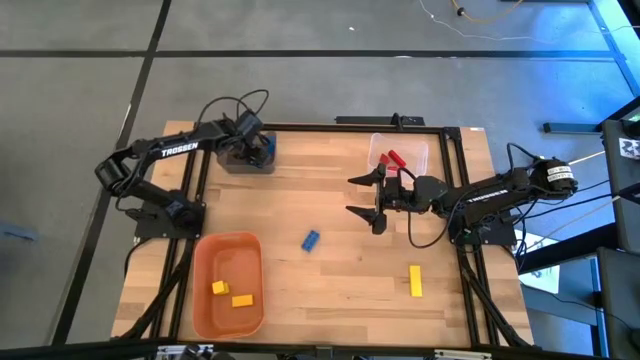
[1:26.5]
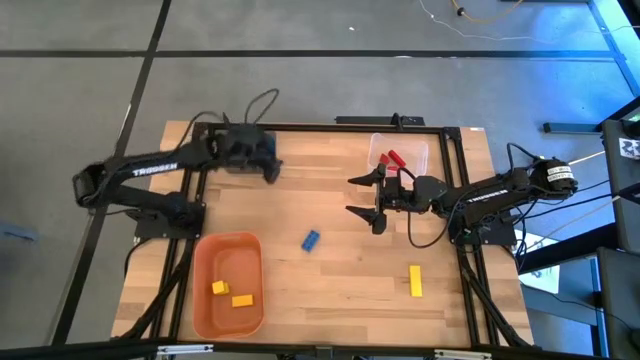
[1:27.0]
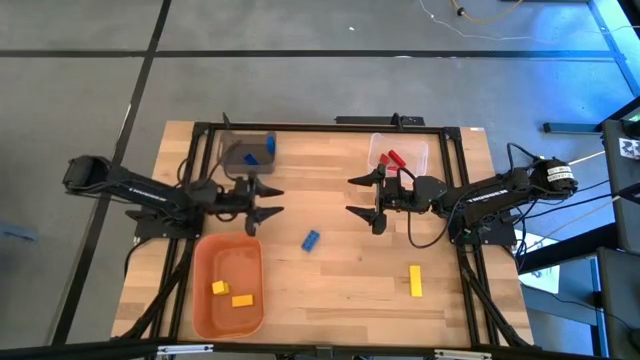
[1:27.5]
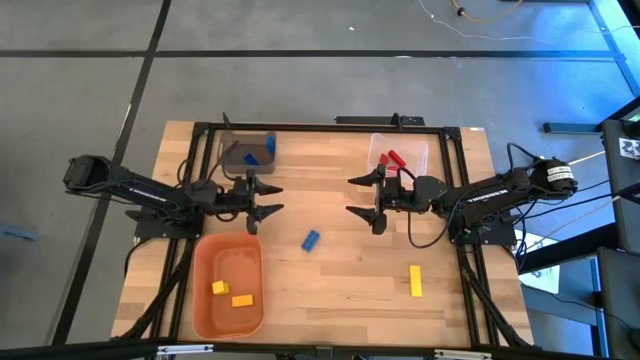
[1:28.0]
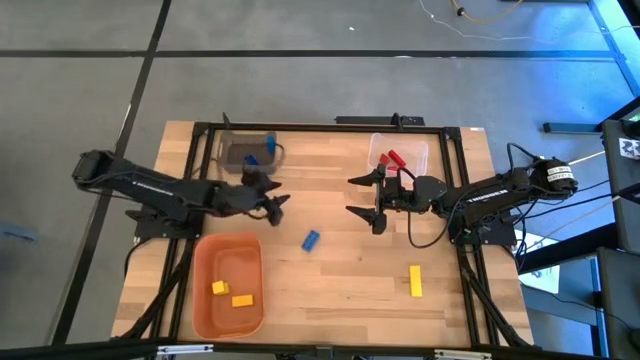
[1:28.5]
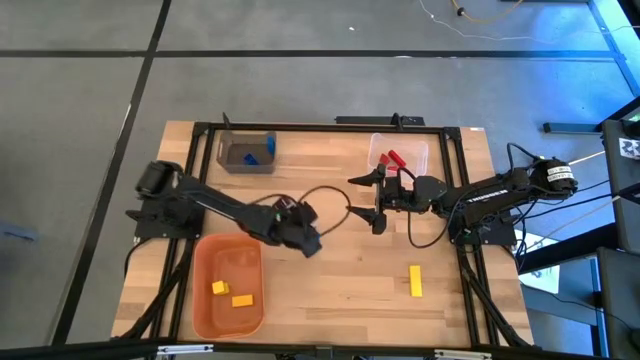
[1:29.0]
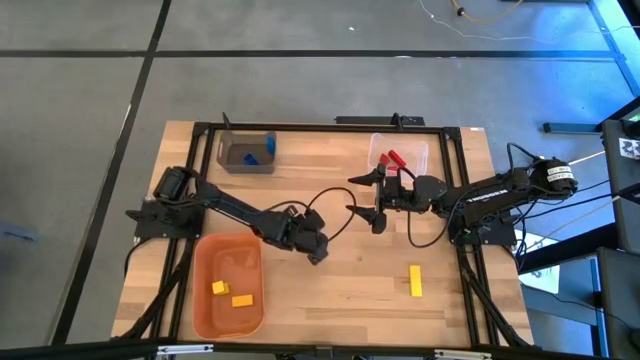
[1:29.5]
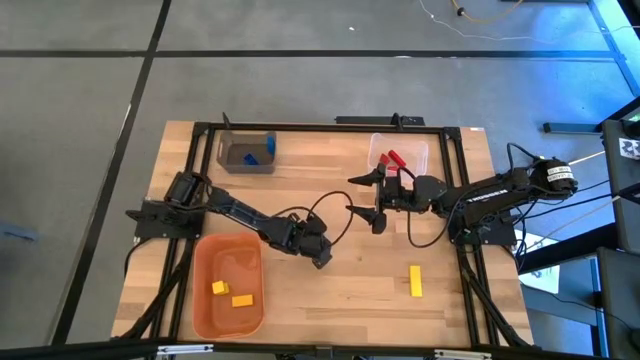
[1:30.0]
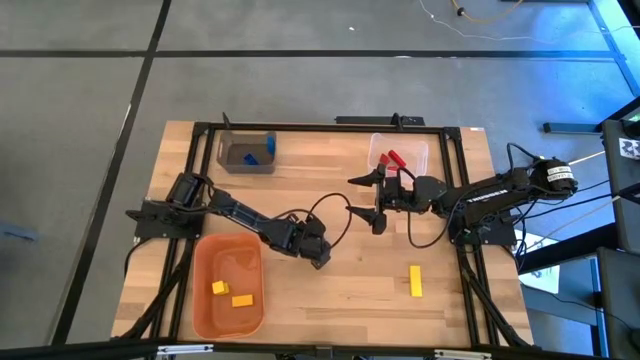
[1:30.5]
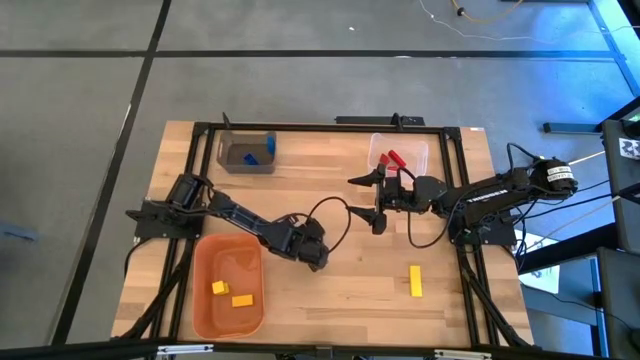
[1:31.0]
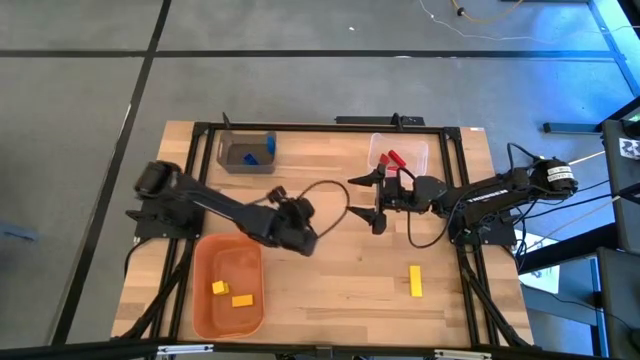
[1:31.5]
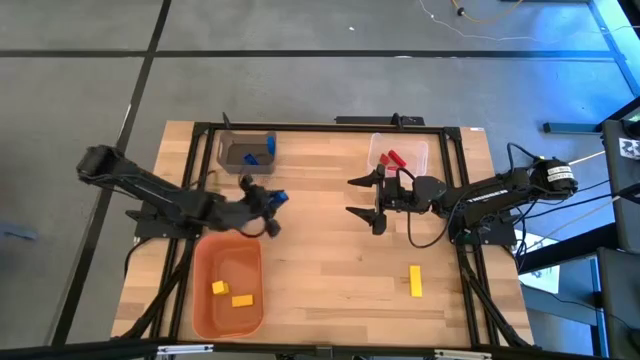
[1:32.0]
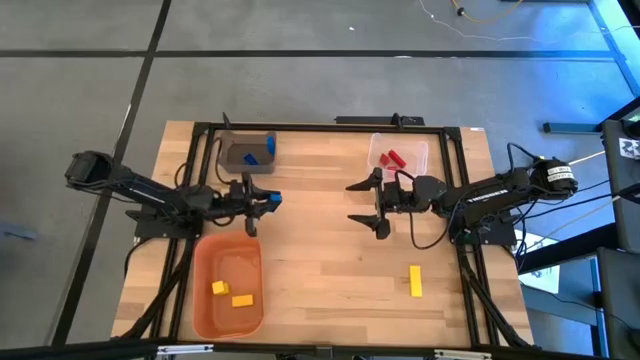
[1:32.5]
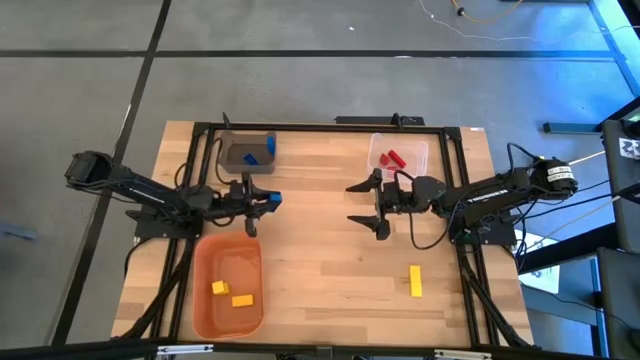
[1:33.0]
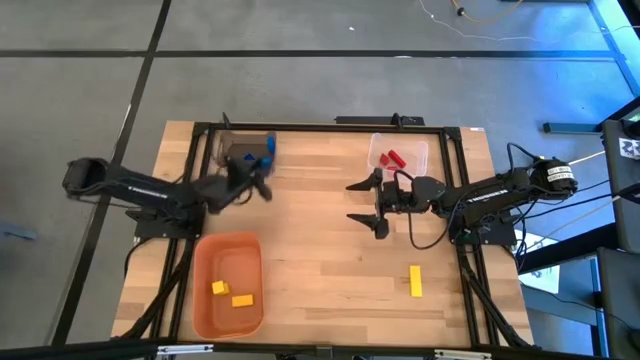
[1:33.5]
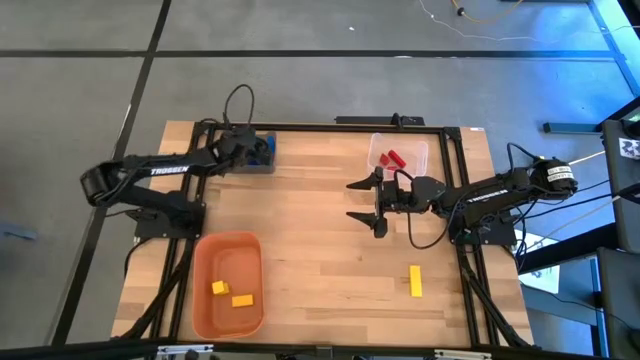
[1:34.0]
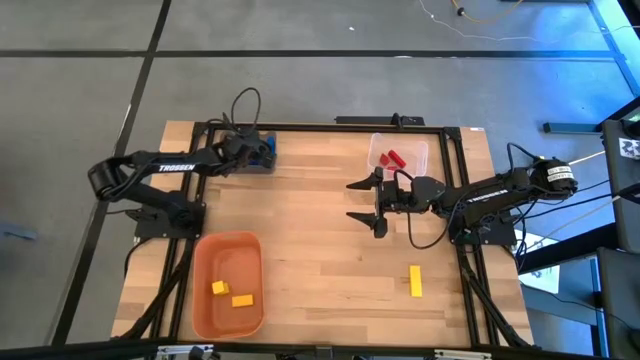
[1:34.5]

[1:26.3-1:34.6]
Task: Sort & place blocks by color
Put the blue gamepiece into the black bin

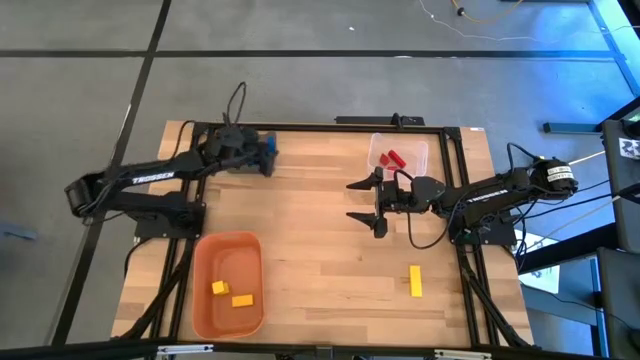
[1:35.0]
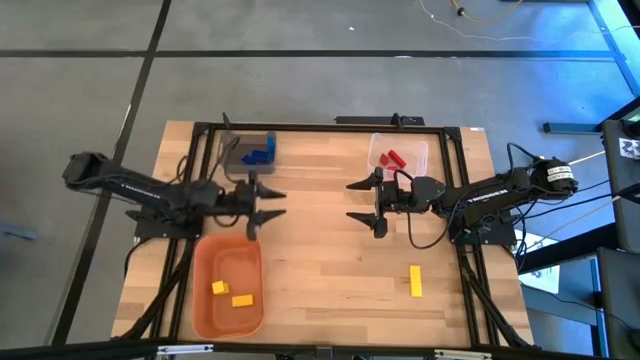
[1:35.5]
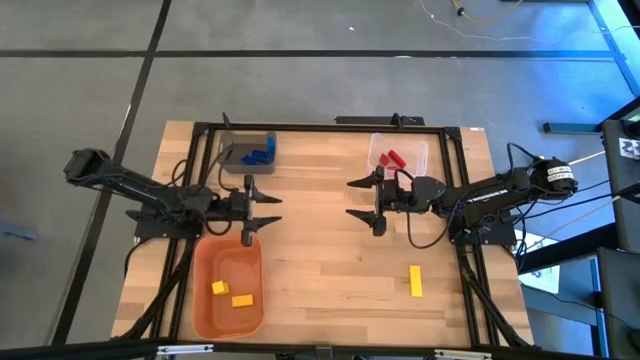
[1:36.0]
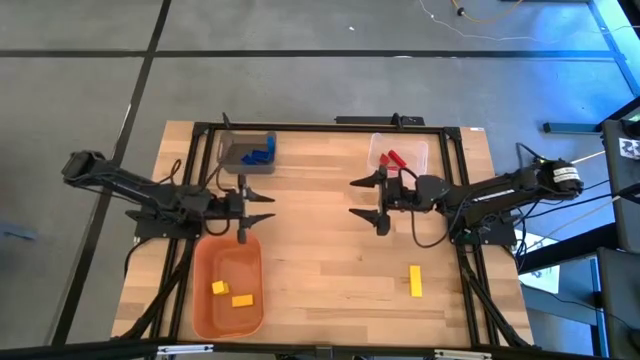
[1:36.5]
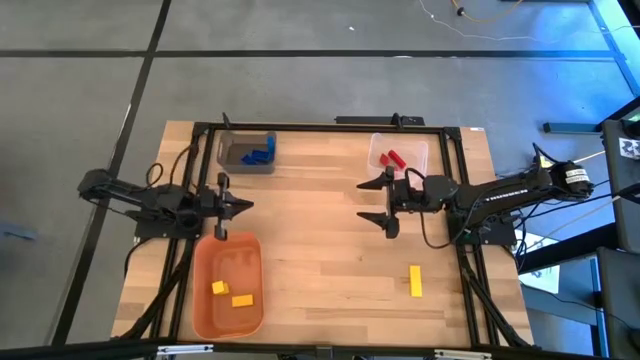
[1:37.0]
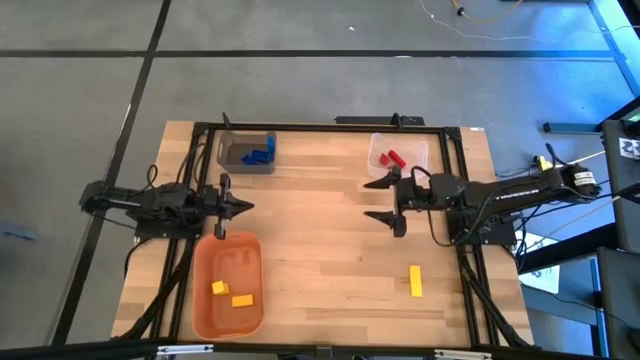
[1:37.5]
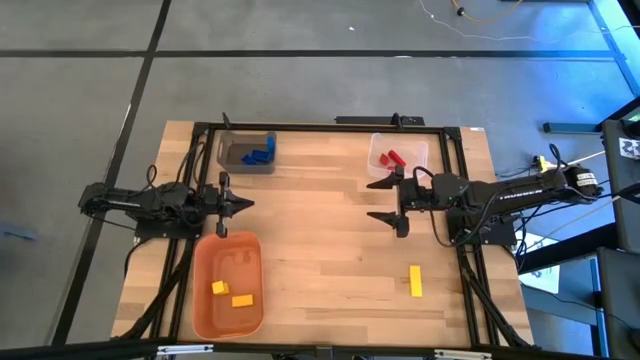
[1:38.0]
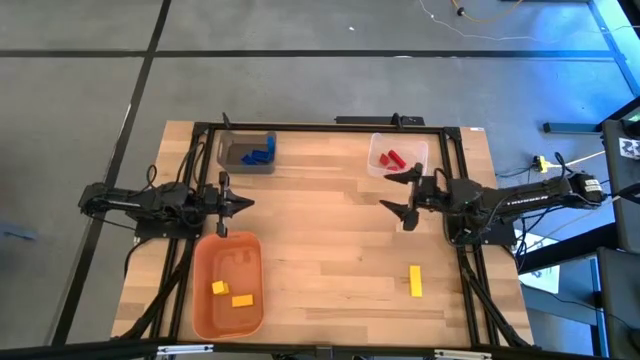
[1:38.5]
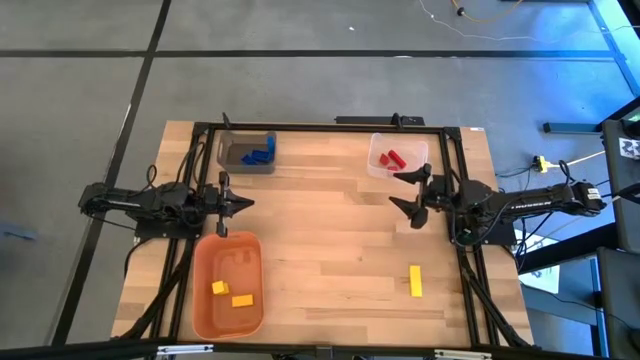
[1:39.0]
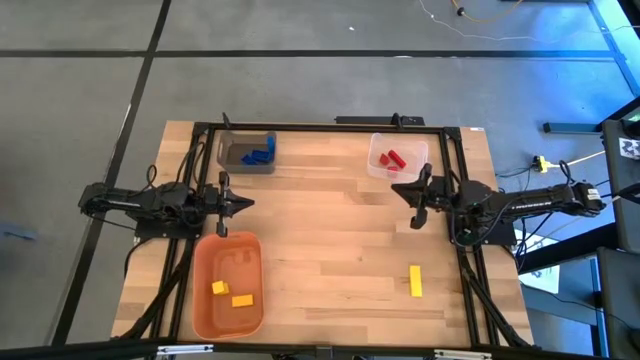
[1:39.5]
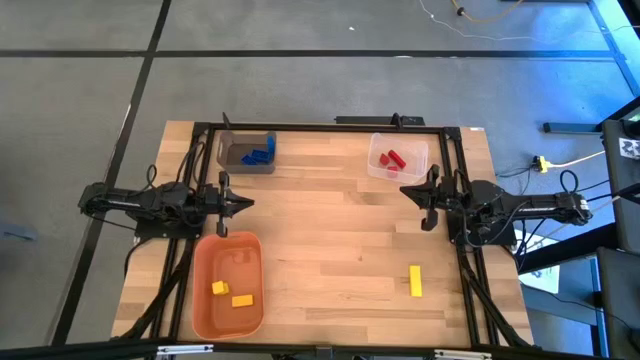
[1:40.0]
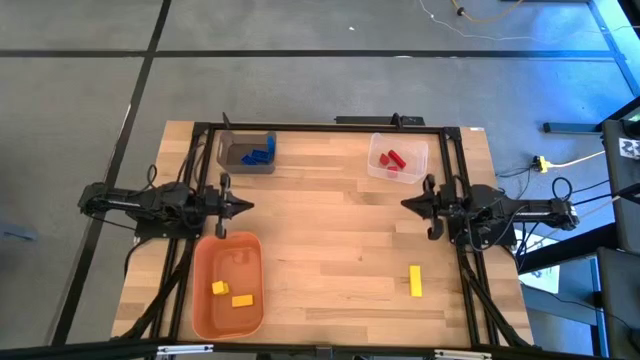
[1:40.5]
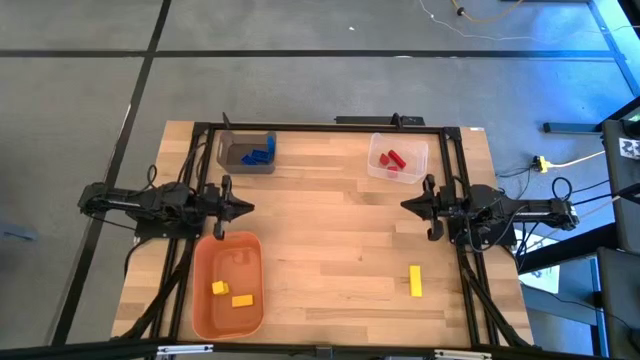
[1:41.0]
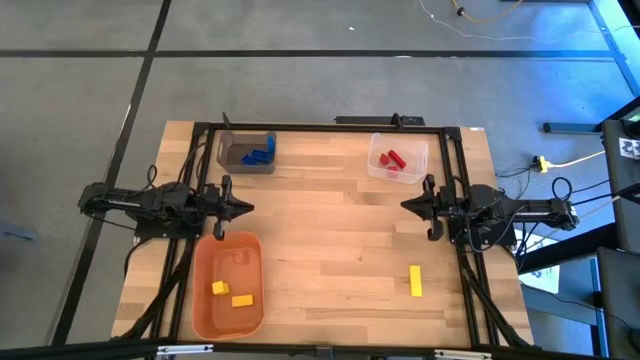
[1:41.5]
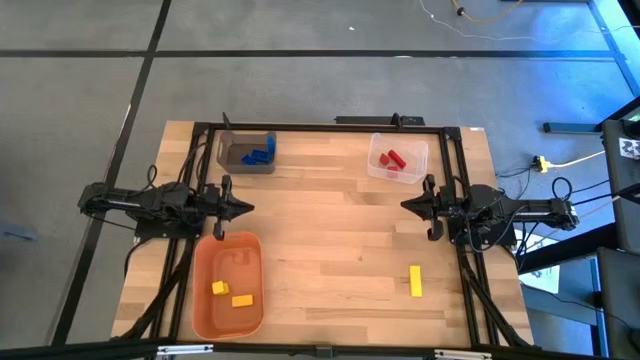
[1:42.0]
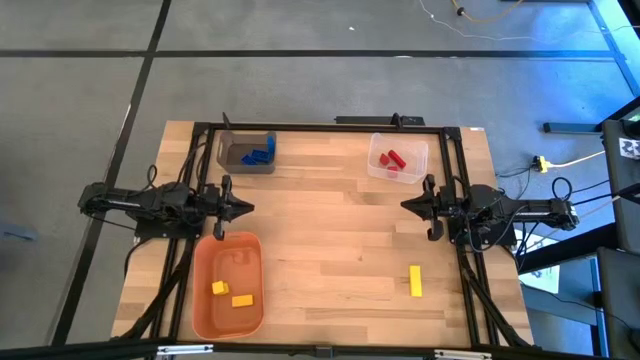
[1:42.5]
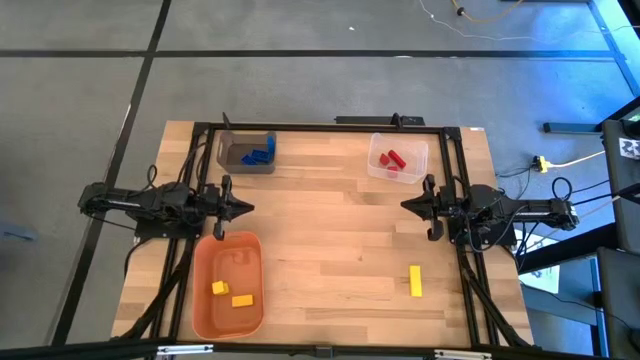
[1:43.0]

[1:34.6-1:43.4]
Return to Home Position

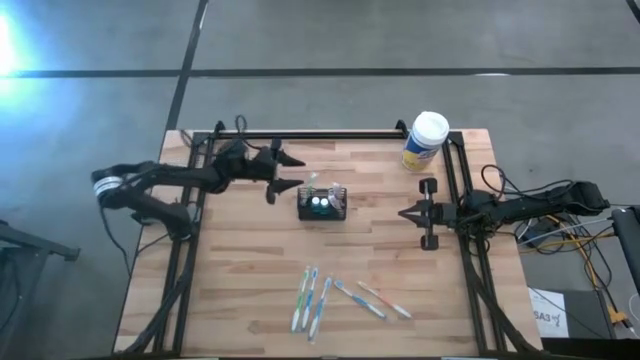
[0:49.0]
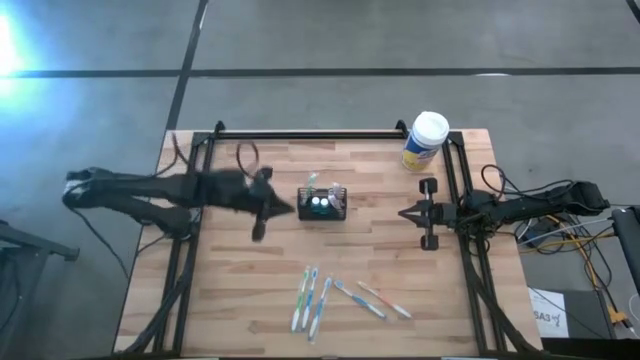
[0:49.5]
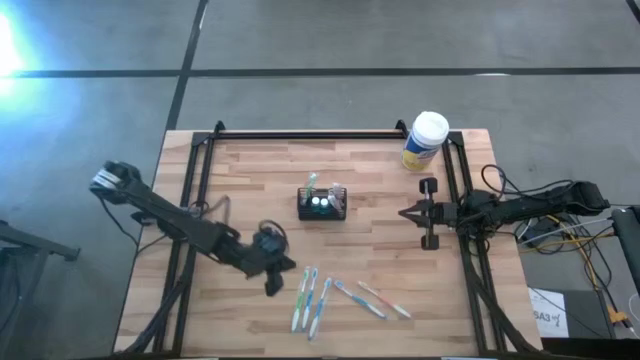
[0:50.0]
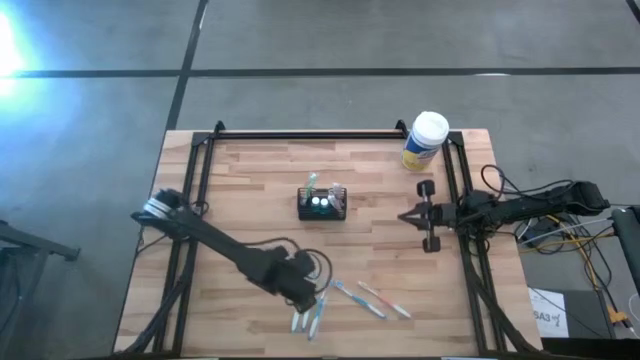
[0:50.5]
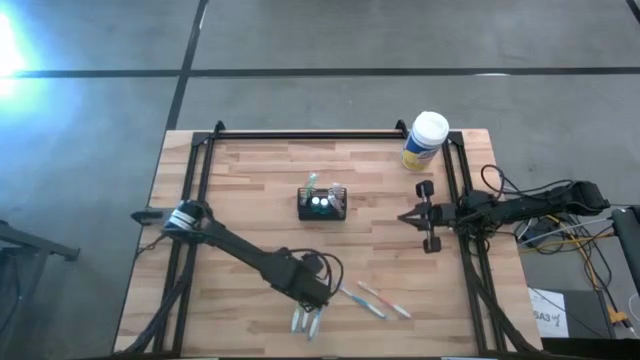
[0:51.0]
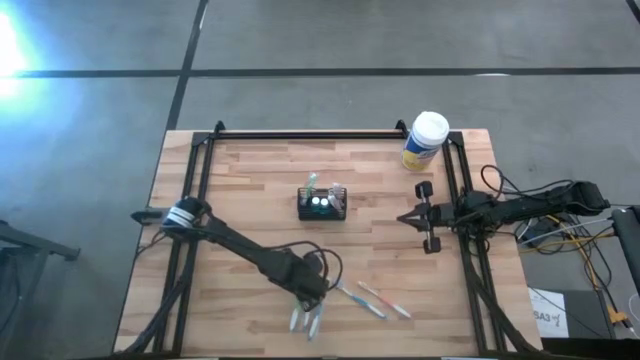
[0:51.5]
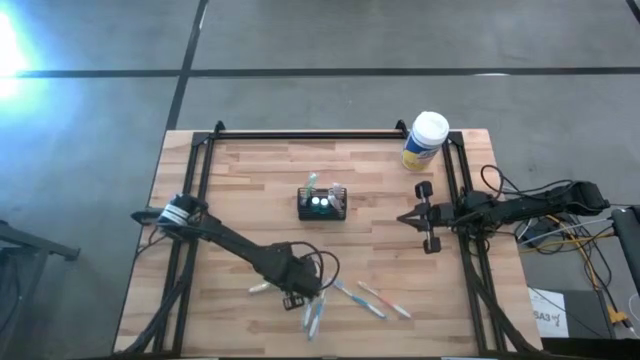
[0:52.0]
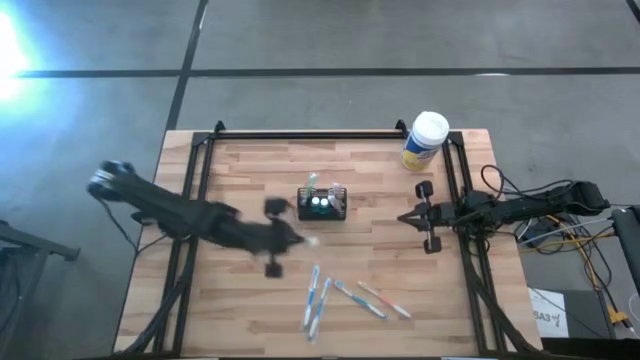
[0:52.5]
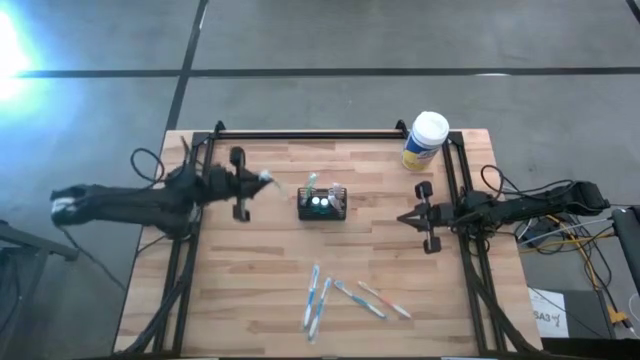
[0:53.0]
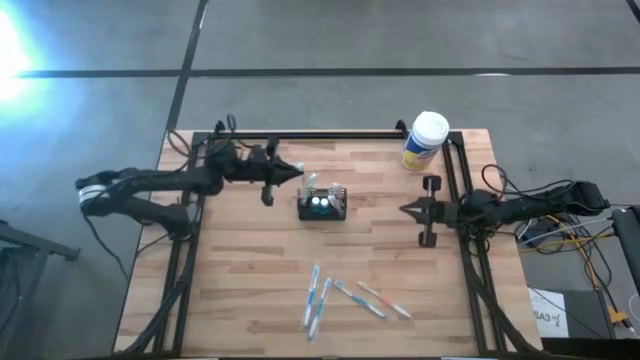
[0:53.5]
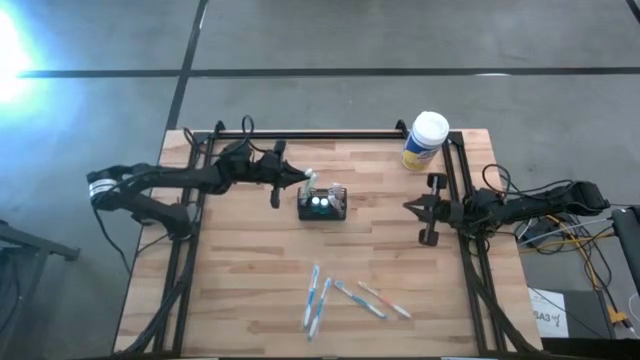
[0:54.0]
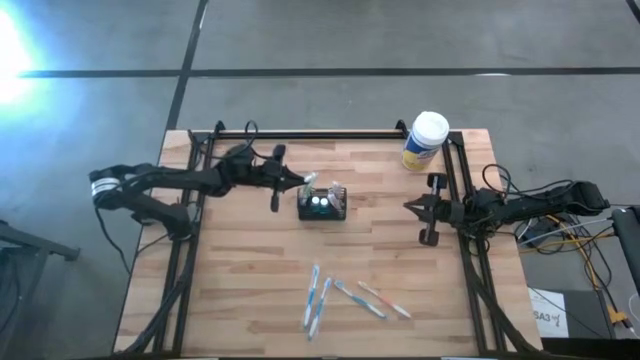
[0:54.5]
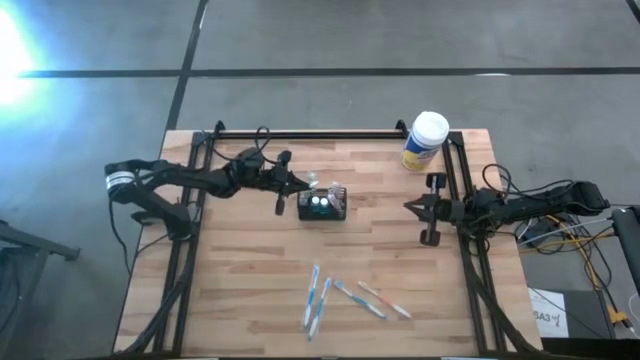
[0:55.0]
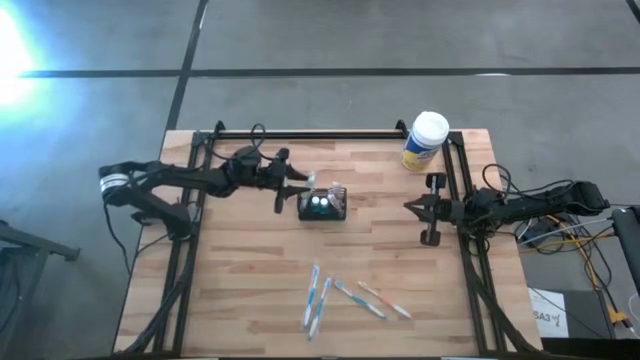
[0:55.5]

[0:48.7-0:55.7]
Task: Pick & Place toothbrushing station
Put the green toothbrush in the wire organizer
